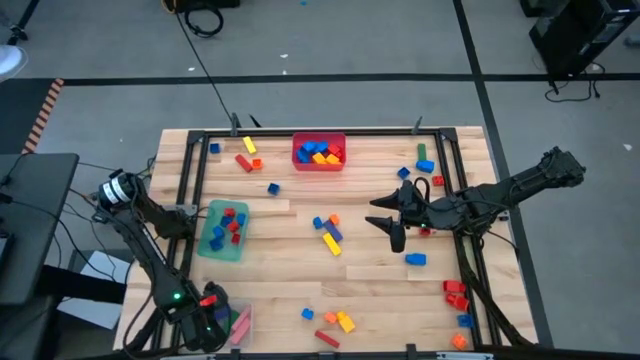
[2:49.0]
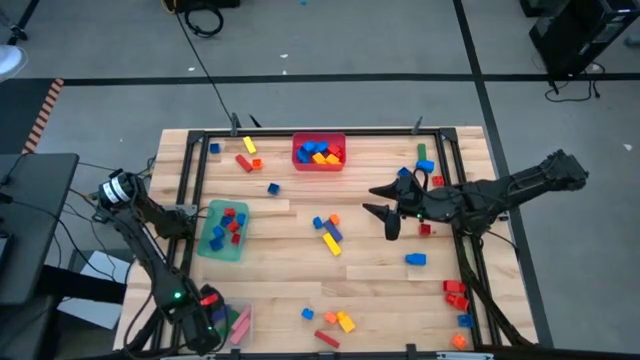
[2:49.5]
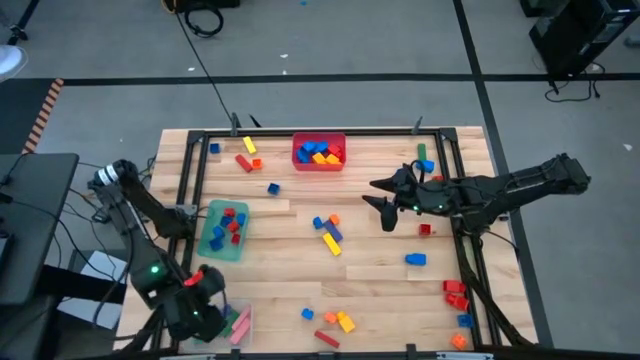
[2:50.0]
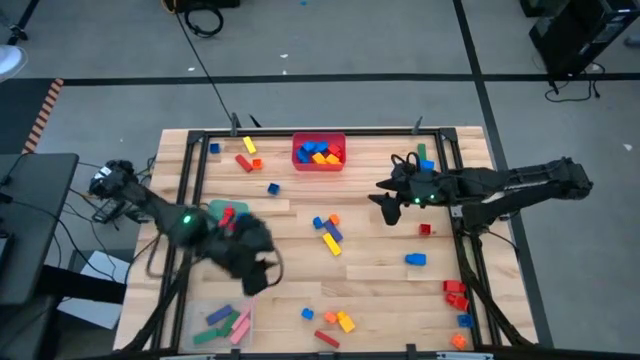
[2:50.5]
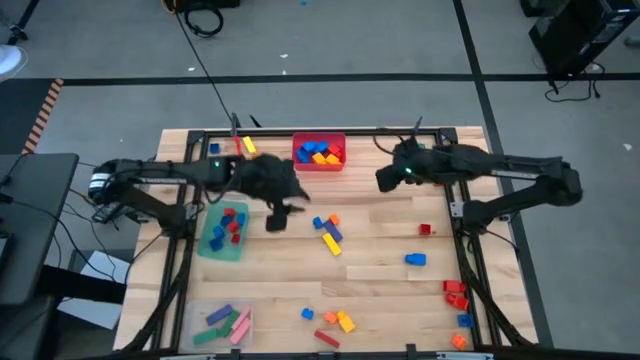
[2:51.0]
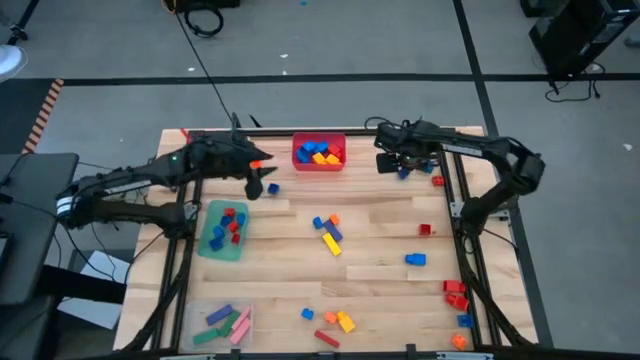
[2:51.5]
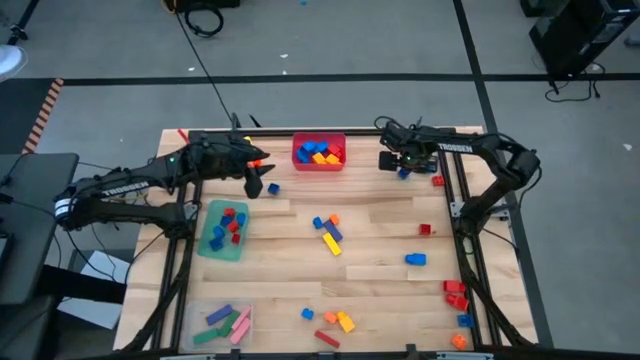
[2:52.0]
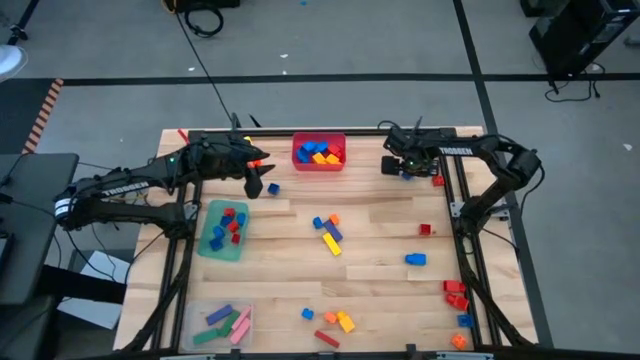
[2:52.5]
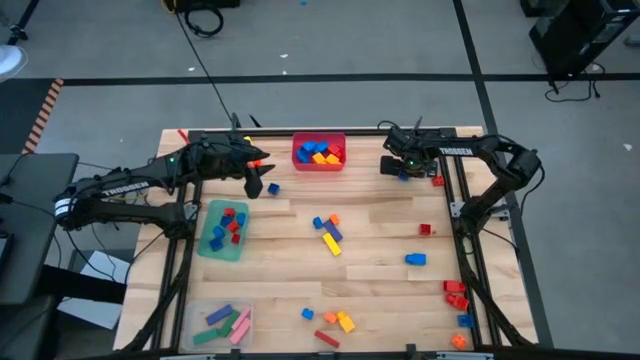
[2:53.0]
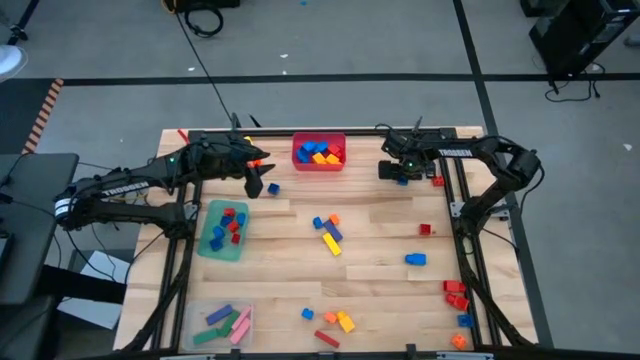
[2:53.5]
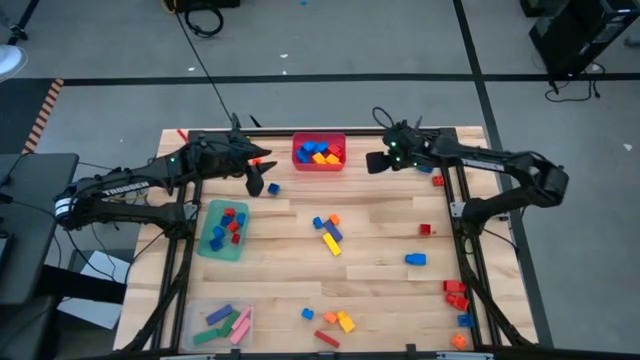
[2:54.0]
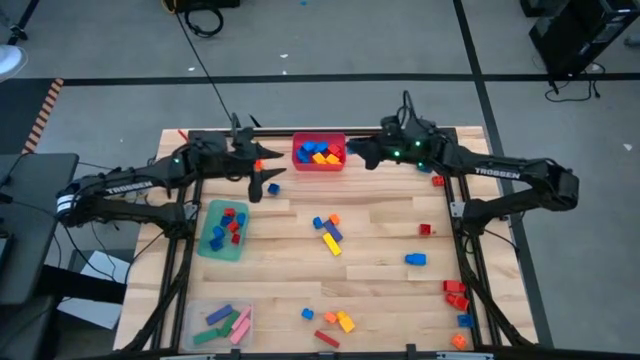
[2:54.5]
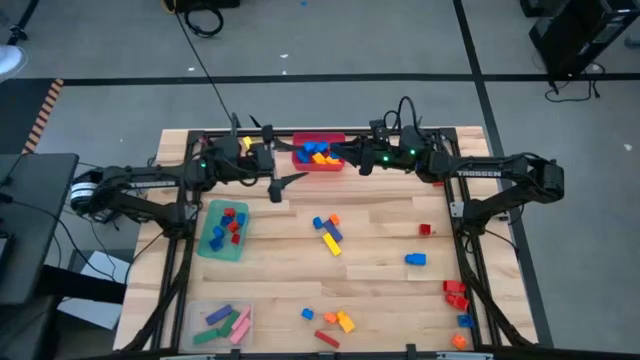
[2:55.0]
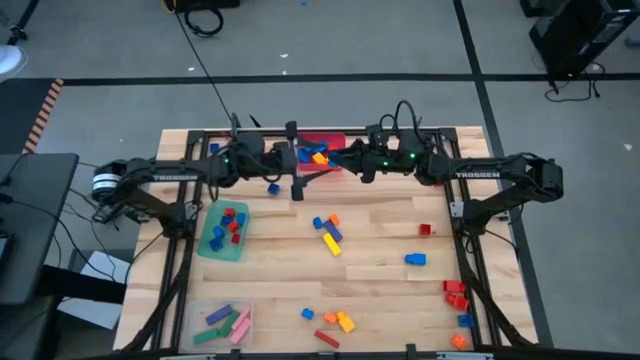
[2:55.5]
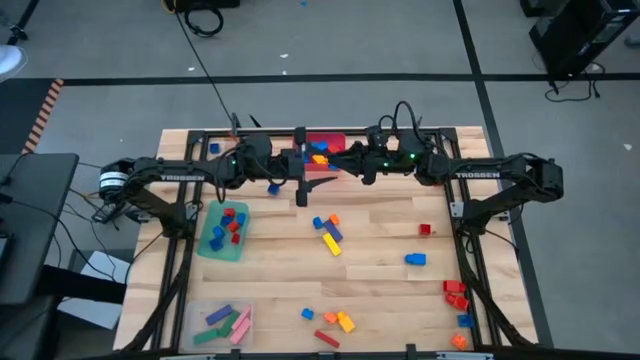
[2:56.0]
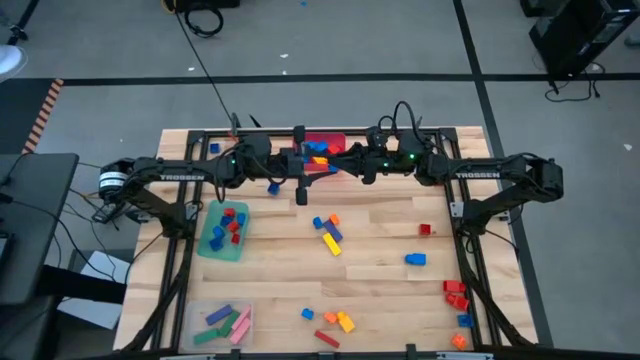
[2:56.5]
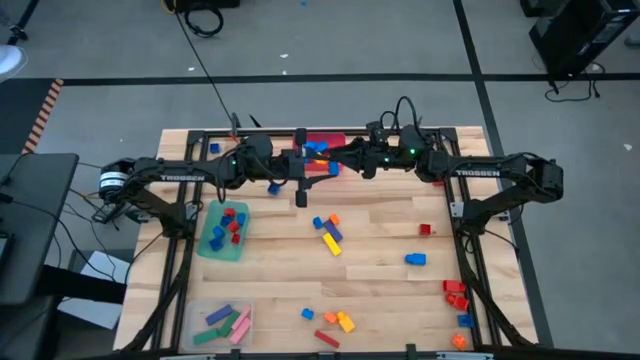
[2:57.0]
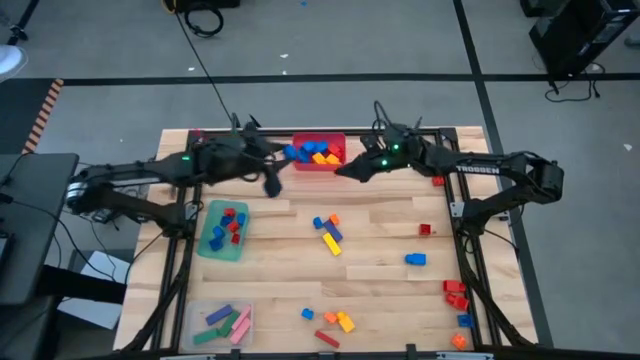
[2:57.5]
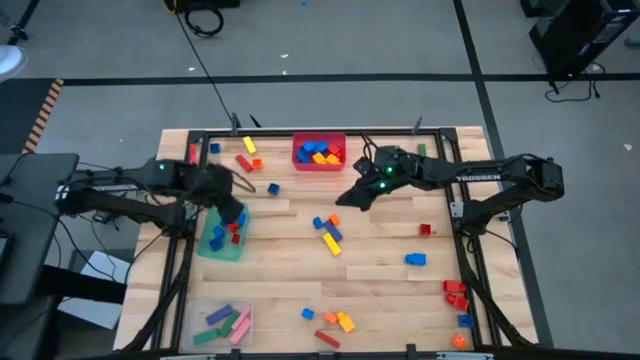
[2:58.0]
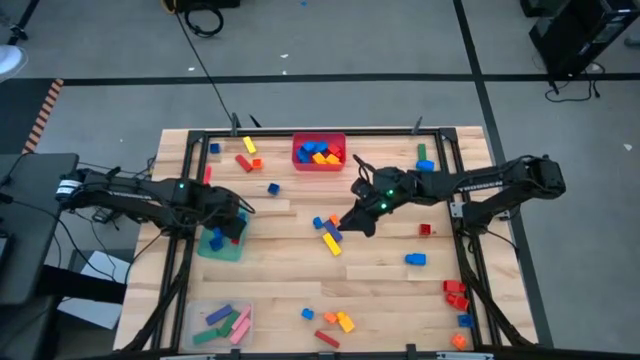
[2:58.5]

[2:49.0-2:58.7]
Task: Sort blocks by size
Put the blue 4 studded building block into the teal bin

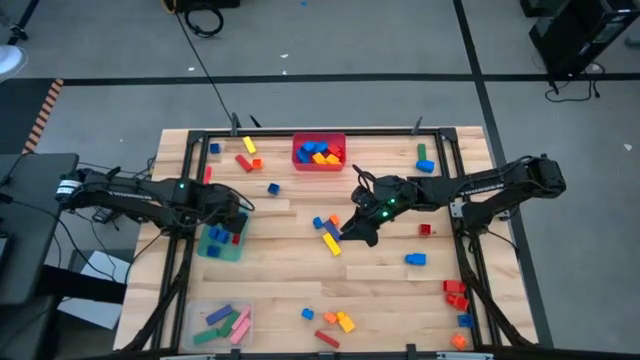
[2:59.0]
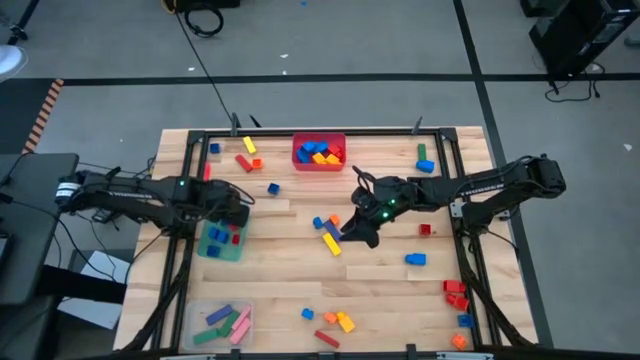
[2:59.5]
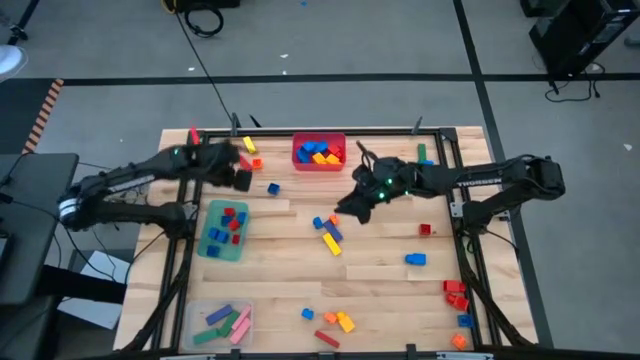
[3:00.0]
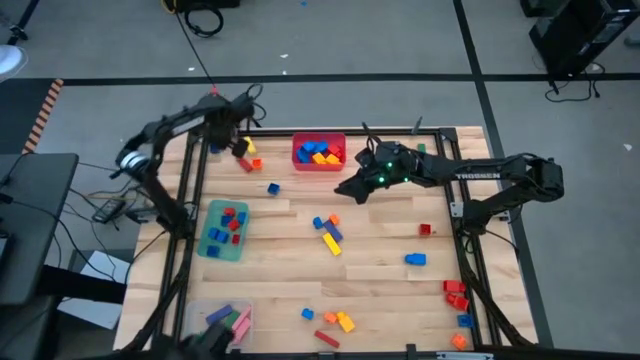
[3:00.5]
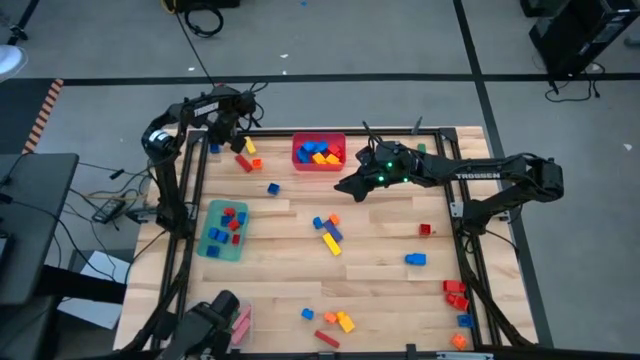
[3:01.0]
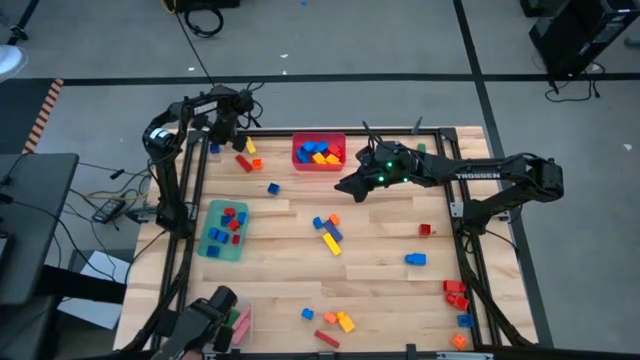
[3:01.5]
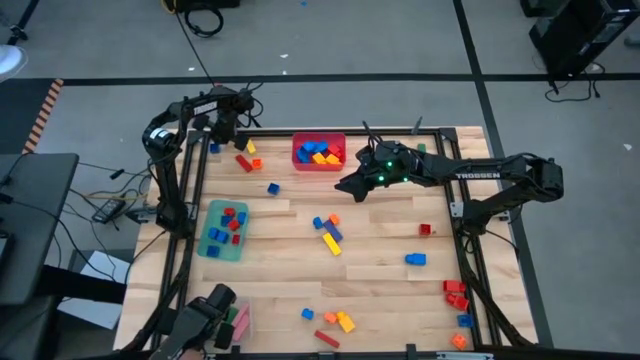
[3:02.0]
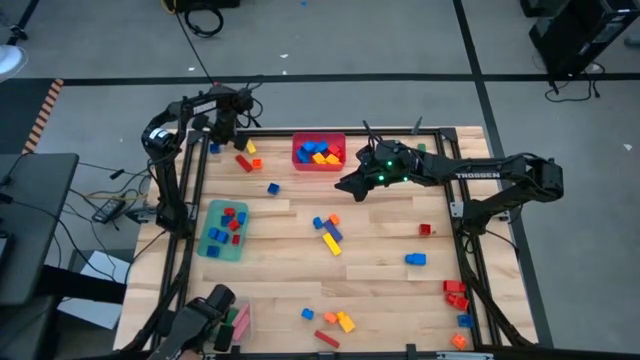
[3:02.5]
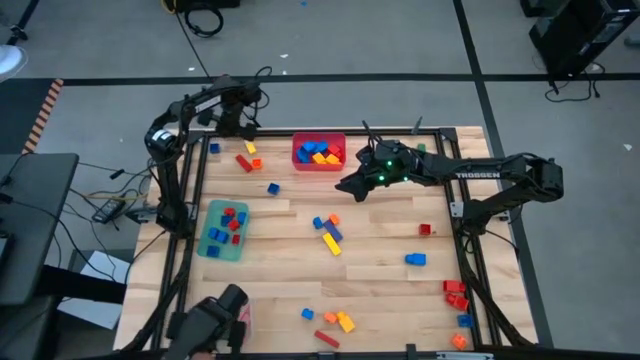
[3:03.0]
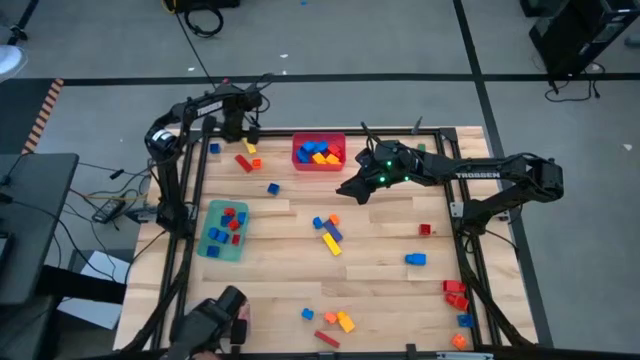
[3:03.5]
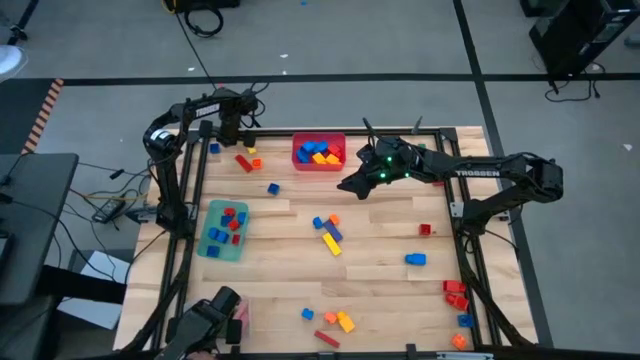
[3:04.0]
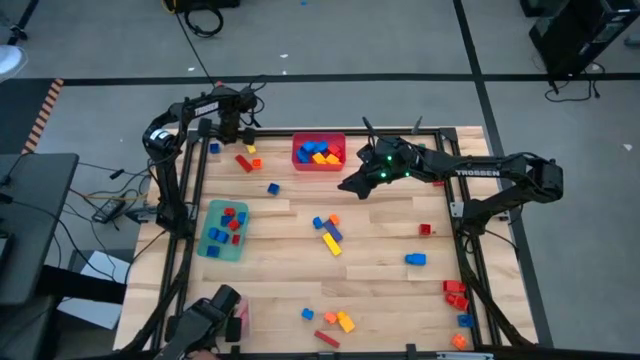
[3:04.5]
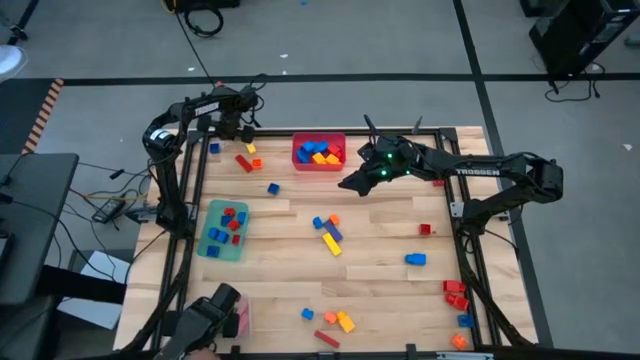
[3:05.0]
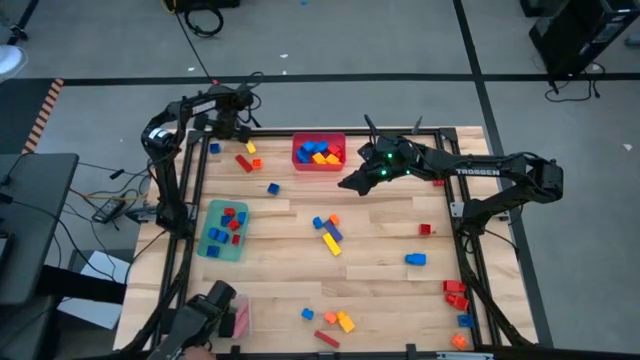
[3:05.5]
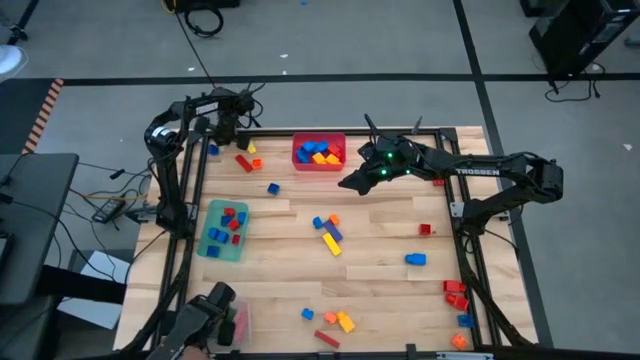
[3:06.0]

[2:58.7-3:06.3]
Put the blue 4 studded building block into the teal bin

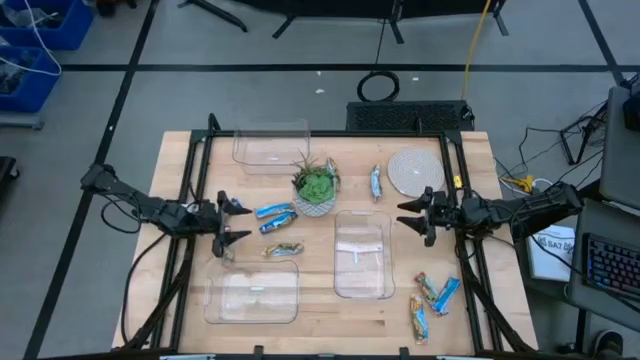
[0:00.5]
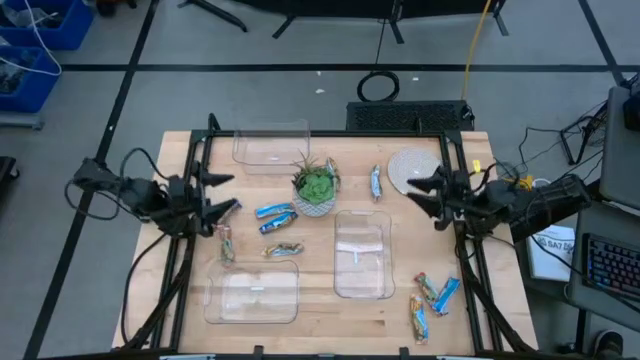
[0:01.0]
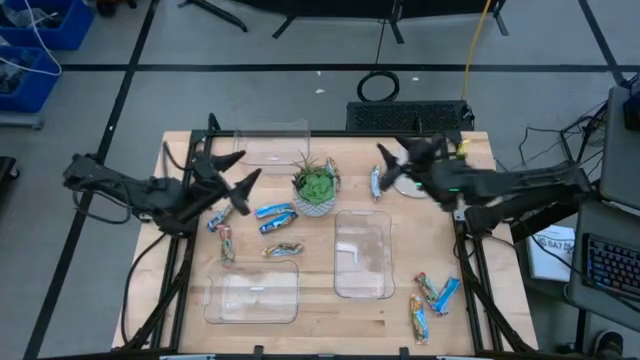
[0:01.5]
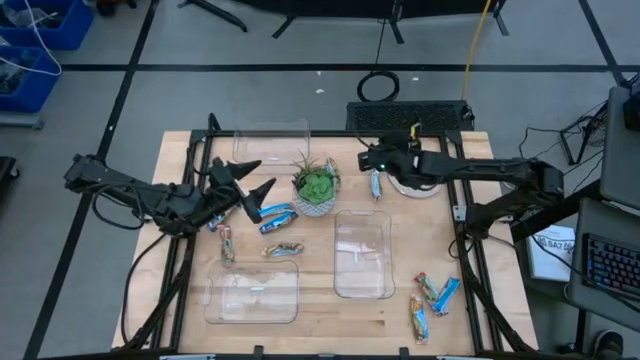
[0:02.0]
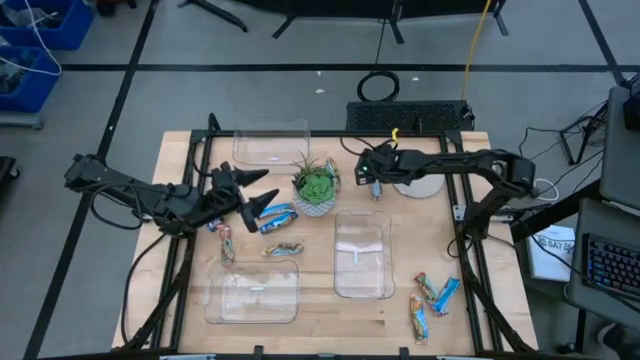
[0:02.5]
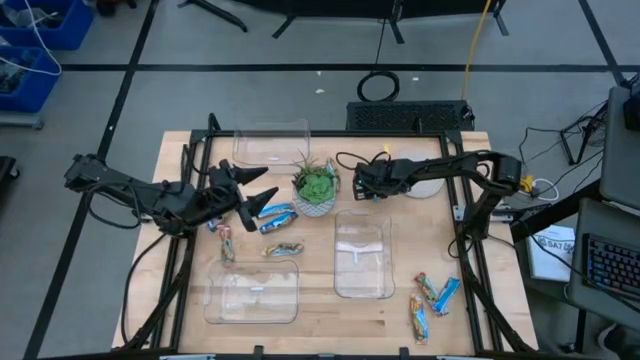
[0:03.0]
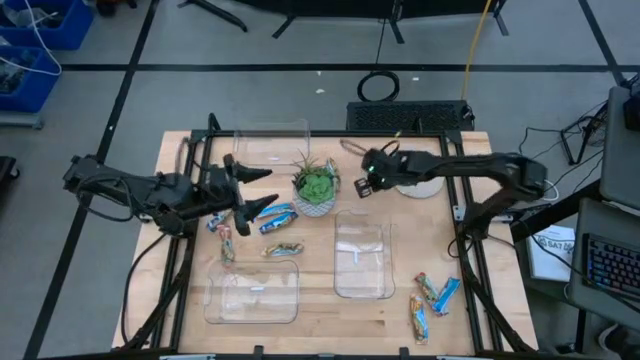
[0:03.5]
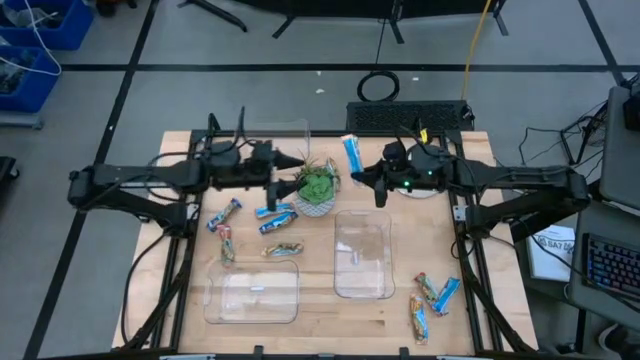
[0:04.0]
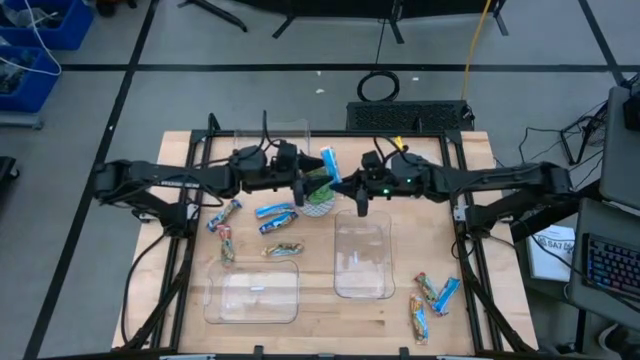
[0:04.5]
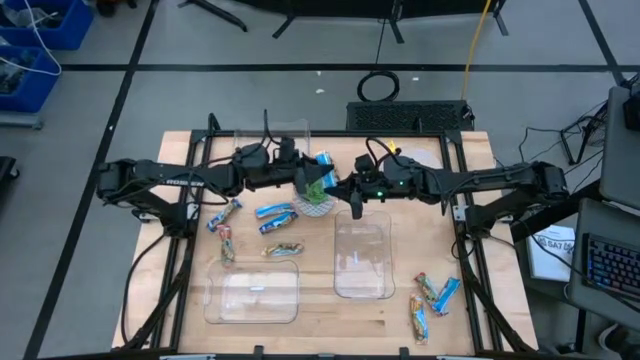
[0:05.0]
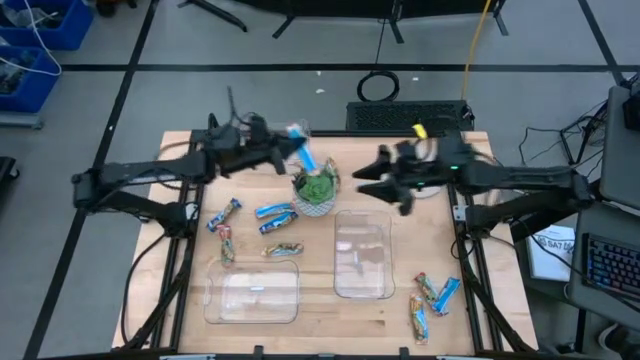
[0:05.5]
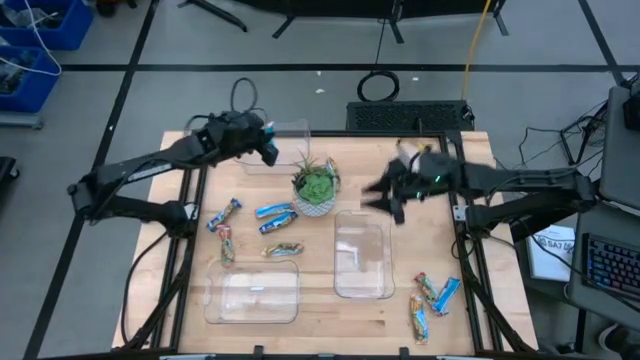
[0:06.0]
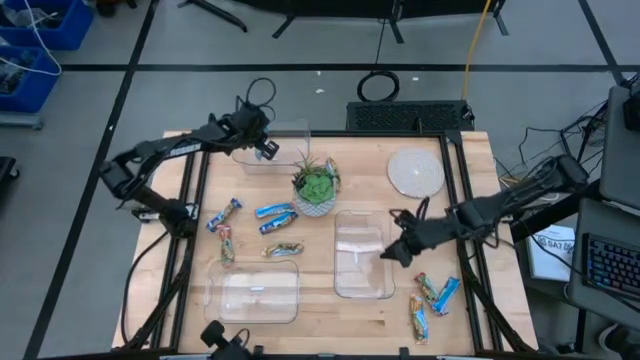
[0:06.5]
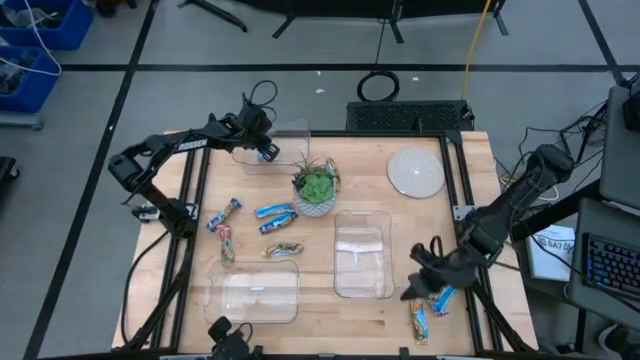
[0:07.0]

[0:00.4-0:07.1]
Task: Pick and place Granola Bars by type
Put the yellow granola bar into the top transparent bin
